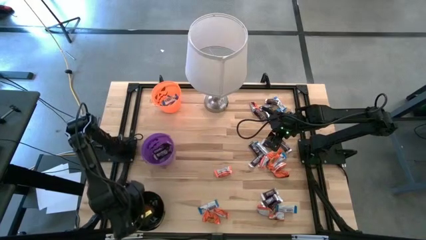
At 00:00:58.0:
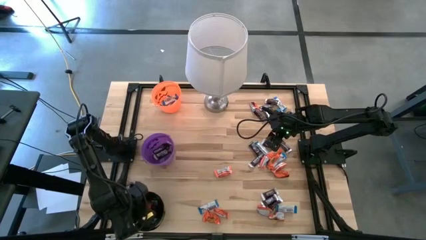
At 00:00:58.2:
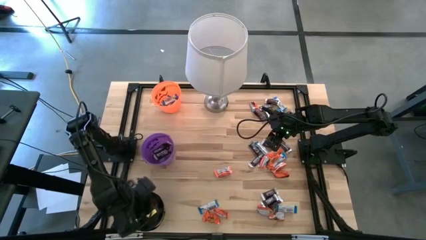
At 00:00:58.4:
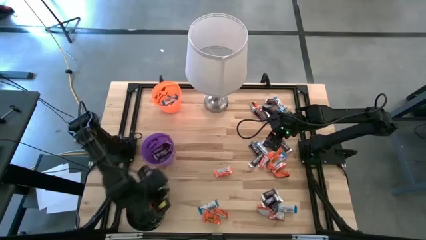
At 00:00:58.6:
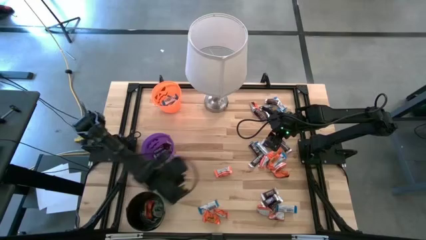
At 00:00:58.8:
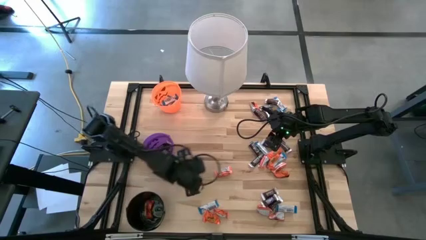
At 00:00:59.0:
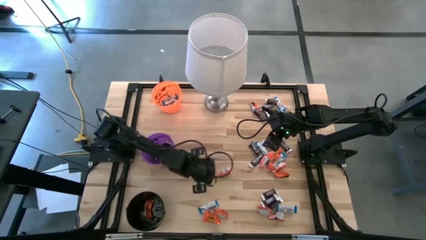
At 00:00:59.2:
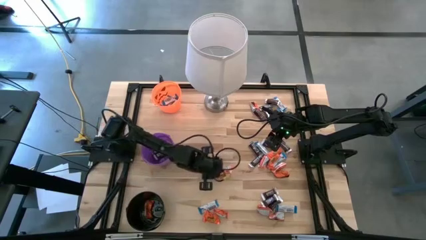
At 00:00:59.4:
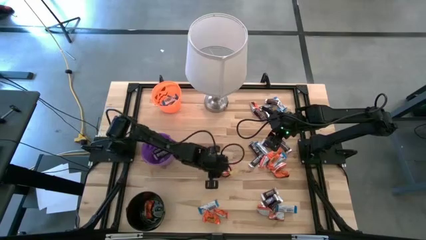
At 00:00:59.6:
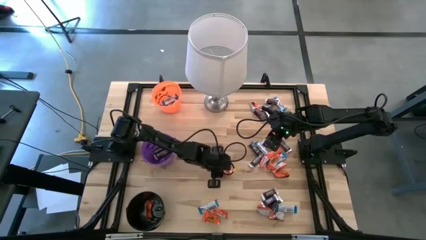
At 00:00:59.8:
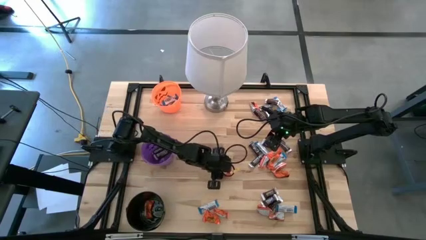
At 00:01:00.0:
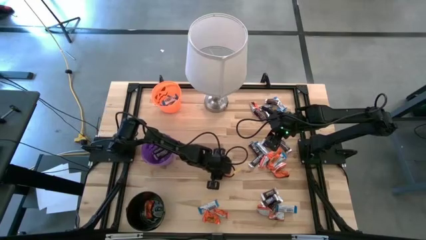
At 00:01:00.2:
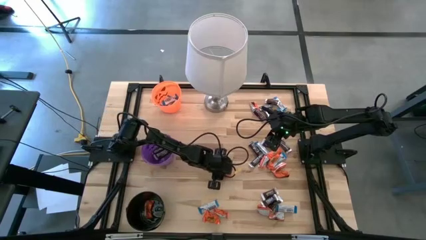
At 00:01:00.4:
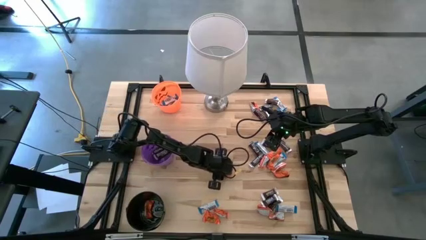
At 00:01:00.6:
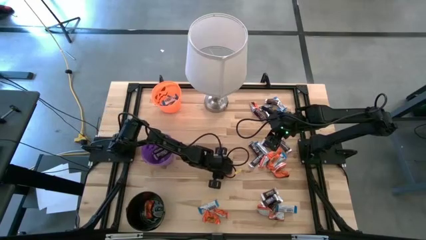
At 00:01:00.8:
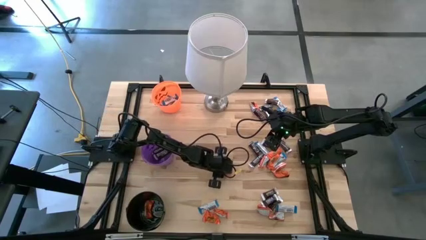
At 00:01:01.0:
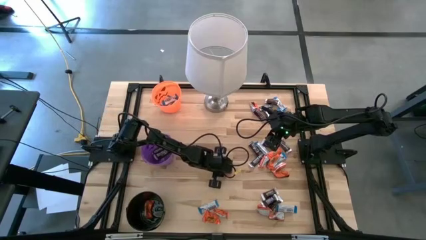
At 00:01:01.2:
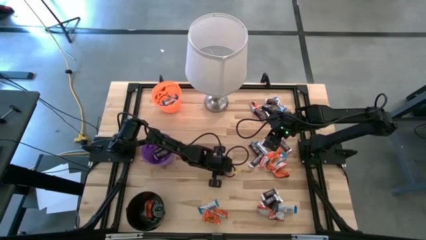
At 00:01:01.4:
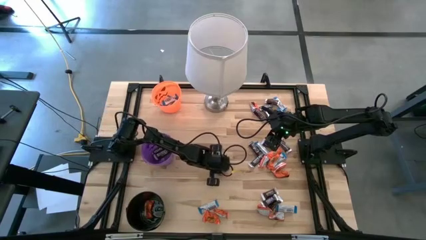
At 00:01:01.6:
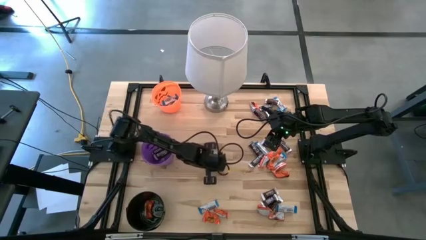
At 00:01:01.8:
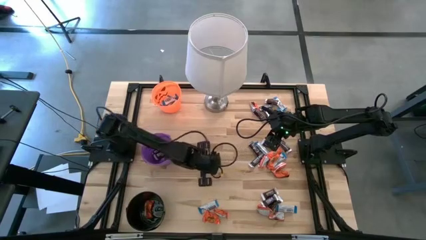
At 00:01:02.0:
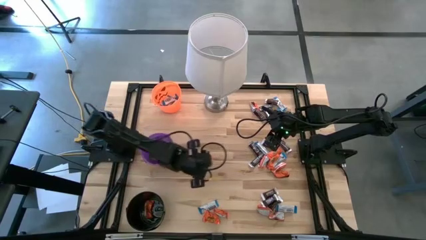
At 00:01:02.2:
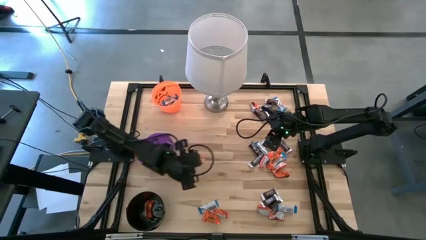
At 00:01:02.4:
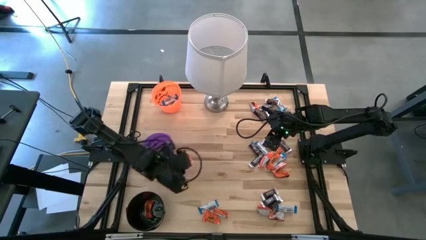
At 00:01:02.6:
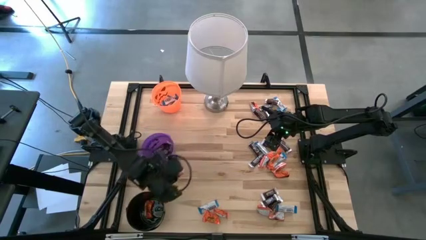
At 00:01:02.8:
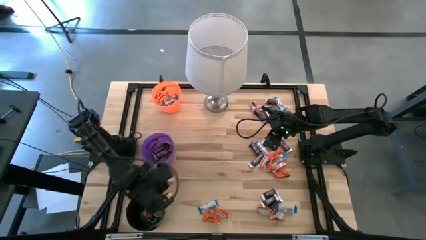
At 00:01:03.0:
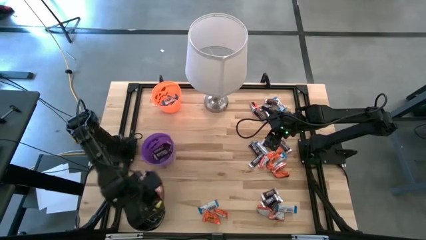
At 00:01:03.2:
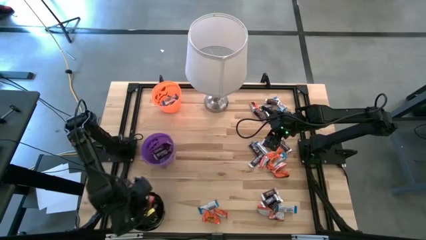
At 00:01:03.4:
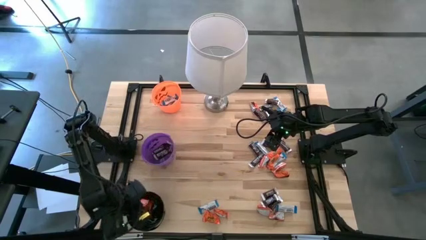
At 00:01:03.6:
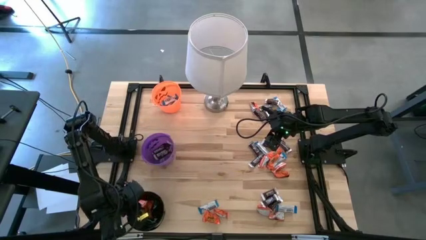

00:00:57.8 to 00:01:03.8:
Task: Sort candy
Put the orange chocolate into the black bucket

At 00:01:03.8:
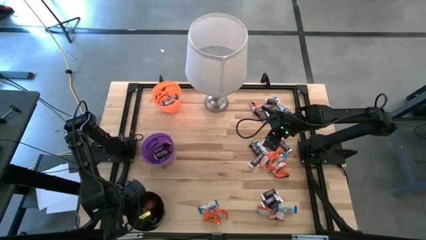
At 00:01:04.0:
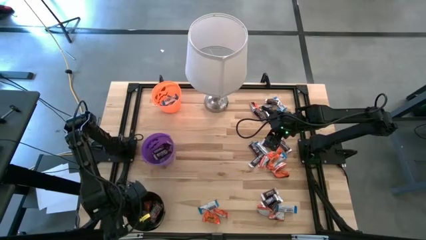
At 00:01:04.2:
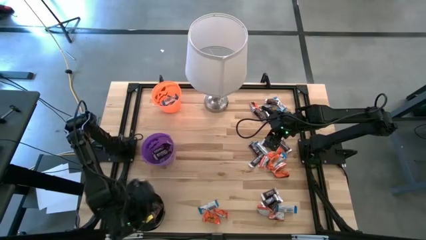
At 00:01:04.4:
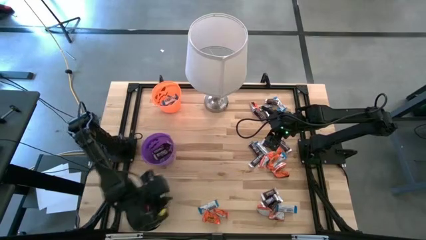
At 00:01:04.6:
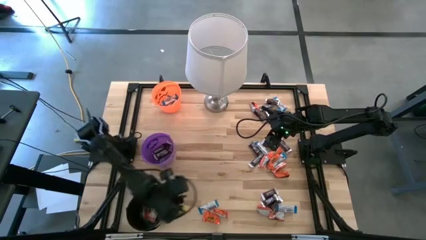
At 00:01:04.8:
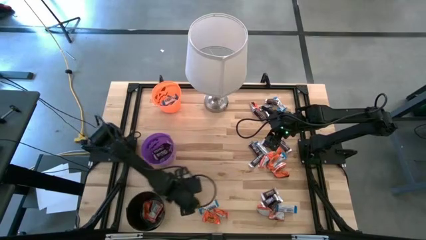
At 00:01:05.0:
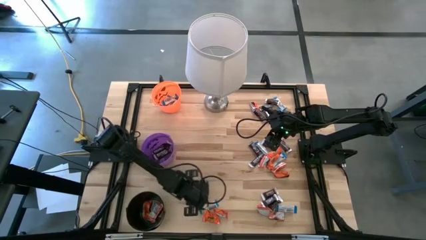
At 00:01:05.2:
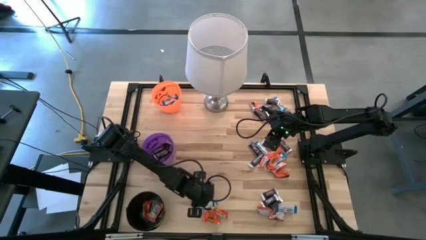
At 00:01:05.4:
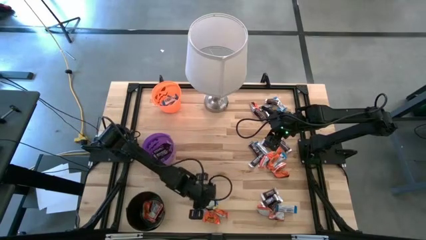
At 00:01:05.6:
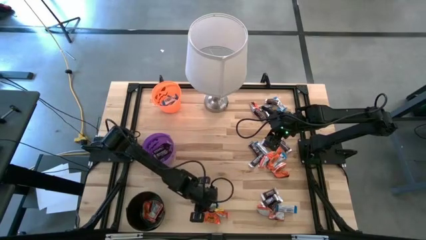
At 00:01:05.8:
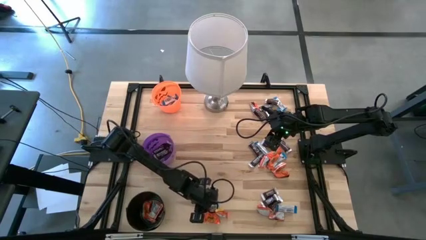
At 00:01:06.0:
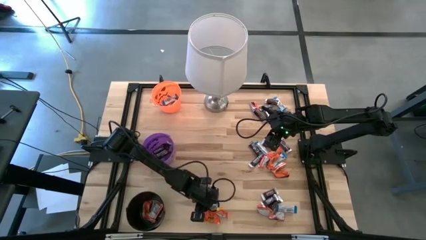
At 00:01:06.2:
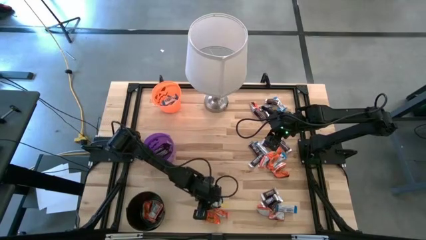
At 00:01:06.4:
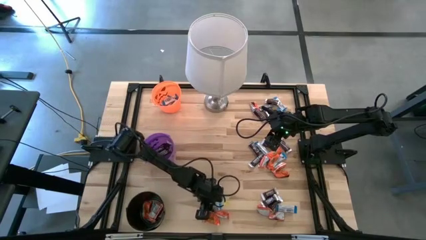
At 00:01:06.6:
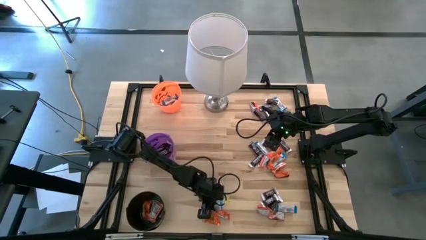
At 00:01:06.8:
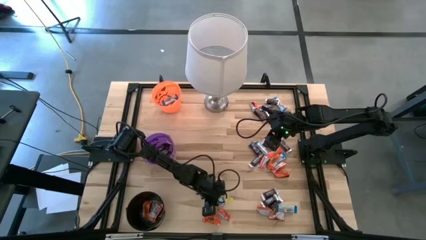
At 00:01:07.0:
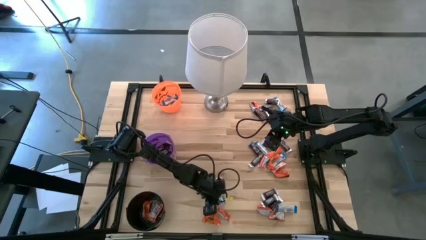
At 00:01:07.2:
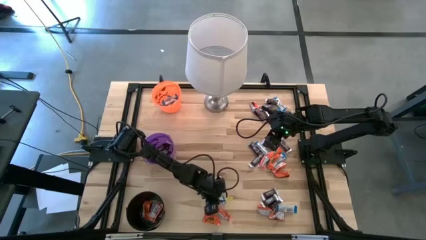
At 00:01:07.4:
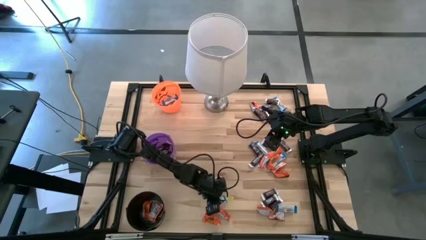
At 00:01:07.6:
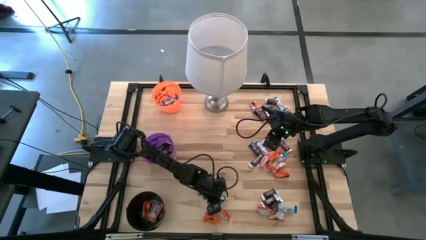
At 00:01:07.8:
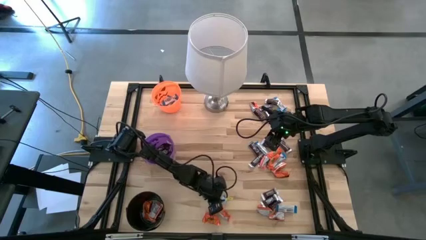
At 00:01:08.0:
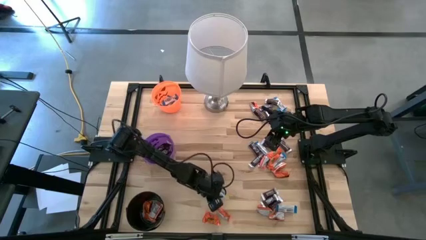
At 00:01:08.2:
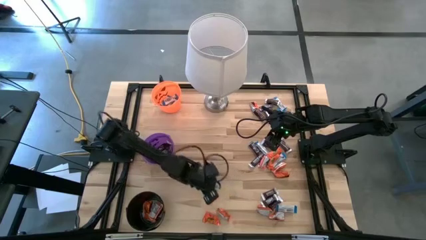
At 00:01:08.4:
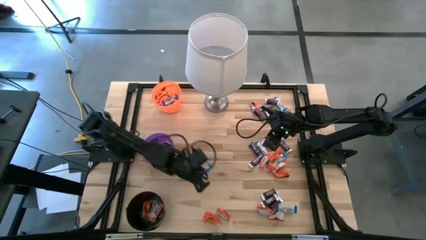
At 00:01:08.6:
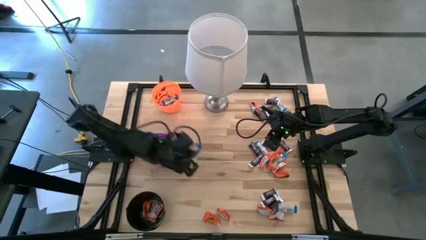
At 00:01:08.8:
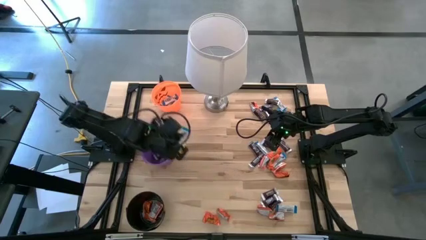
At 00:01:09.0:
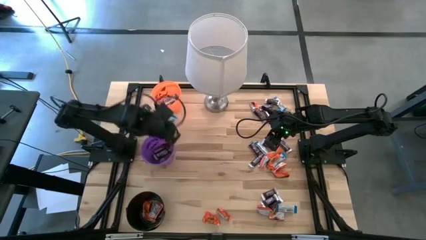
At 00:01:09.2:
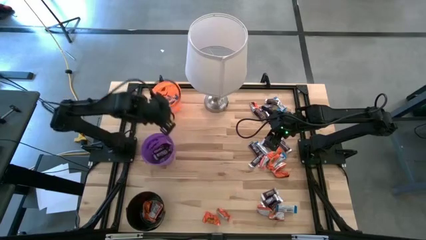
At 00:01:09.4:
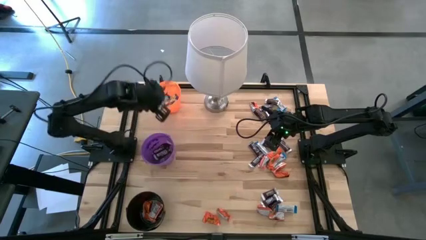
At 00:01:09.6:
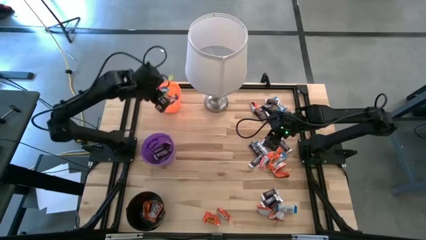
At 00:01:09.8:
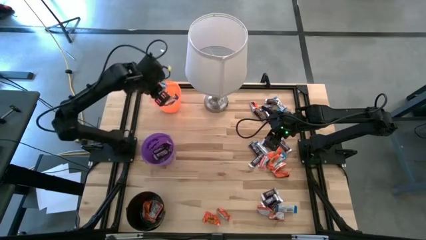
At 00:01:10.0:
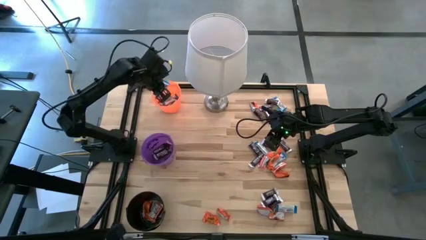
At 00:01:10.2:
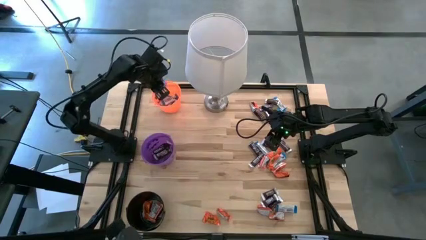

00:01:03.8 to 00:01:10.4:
Put the white chocolate into the orange bucket

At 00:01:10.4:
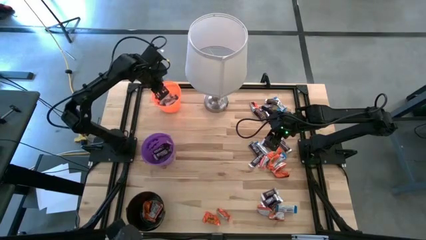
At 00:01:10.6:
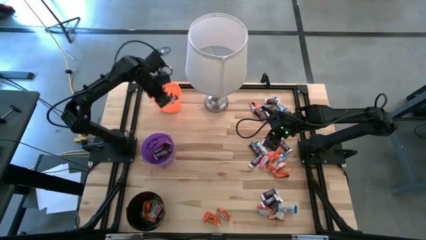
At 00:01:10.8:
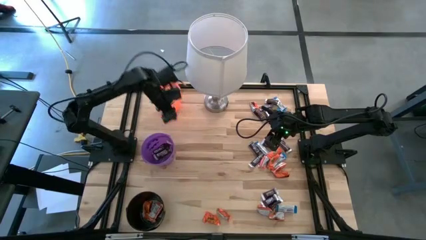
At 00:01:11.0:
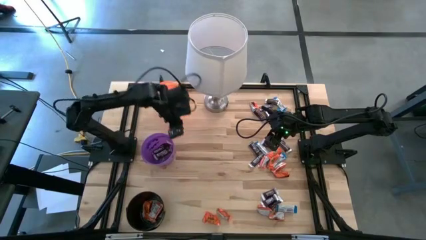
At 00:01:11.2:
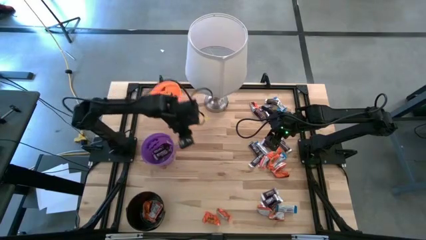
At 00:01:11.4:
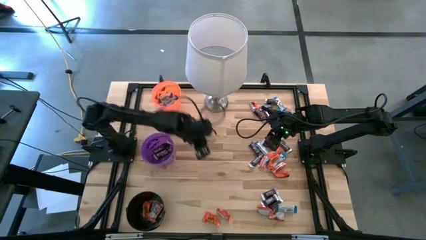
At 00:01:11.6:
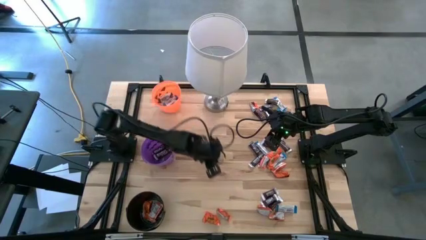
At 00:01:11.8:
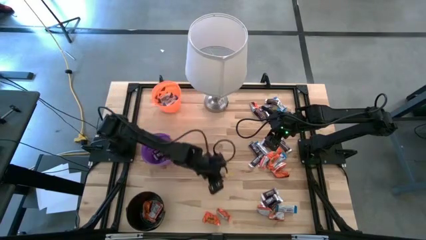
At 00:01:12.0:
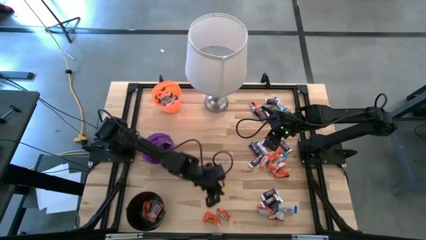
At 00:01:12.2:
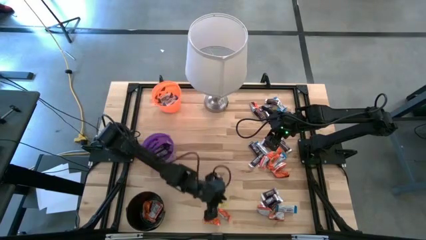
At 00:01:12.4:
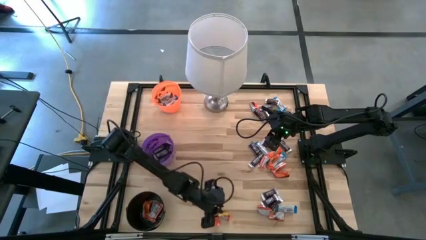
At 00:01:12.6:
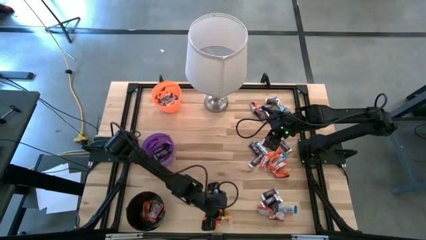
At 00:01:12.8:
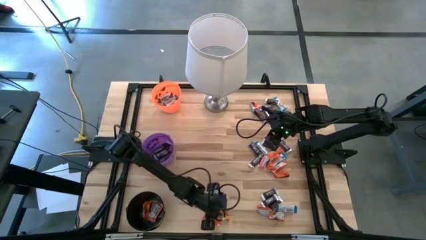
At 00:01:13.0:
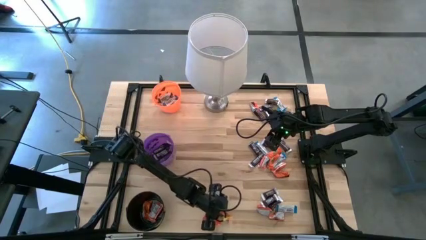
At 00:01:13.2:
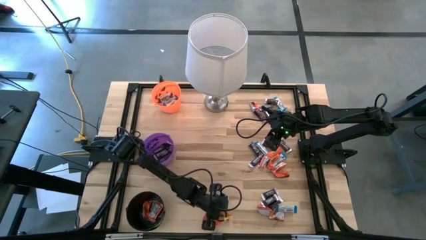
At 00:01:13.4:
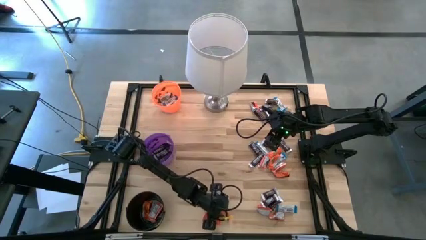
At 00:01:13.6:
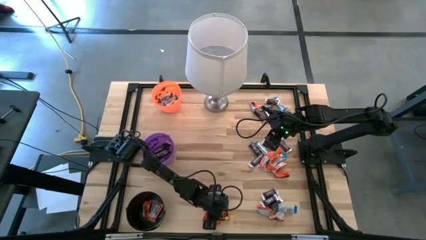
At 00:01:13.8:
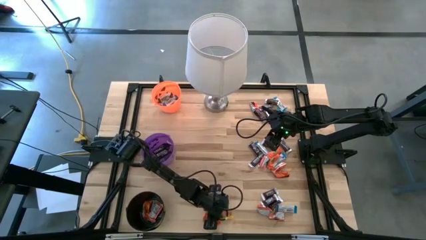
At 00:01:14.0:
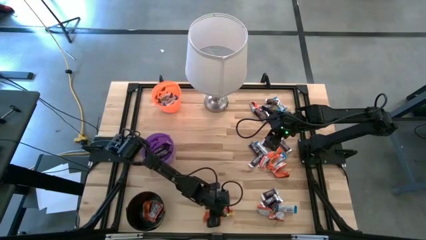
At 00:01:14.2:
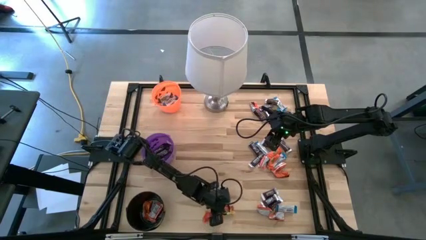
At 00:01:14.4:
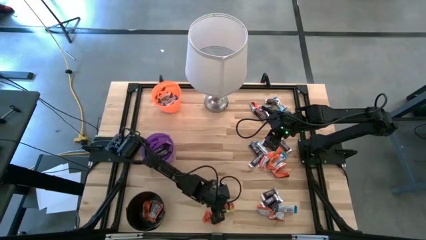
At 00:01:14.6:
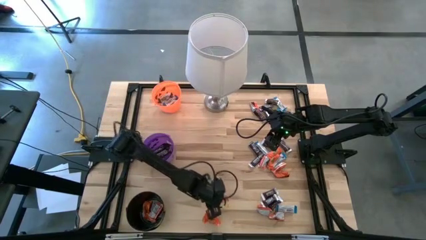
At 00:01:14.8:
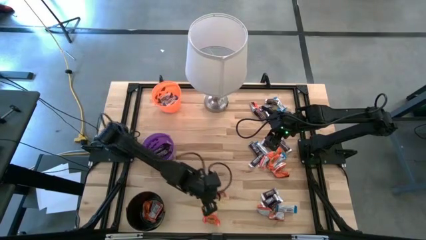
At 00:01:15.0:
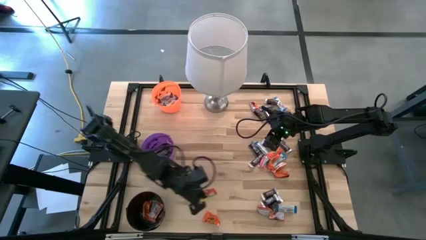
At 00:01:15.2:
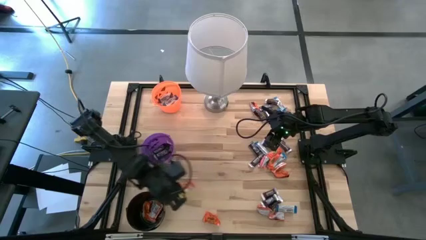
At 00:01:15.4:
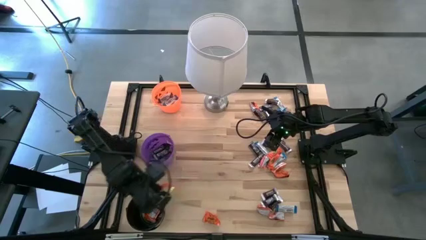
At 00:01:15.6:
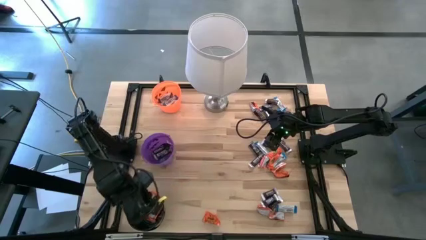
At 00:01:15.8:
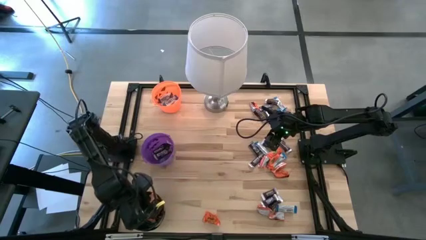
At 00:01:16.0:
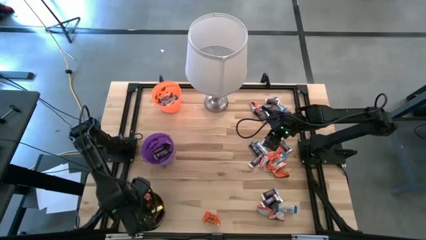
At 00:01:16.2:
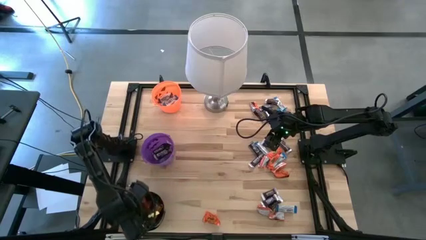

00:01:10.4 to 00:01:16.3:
Put the orange chocolate into the black bucket
